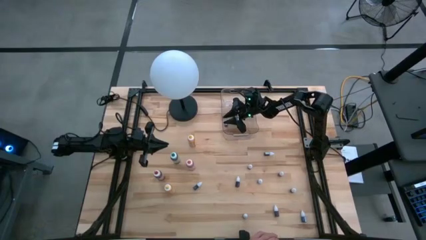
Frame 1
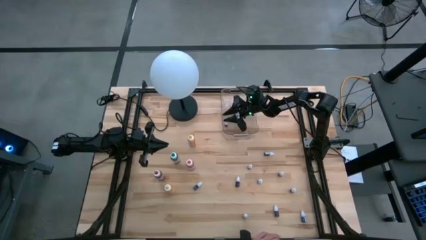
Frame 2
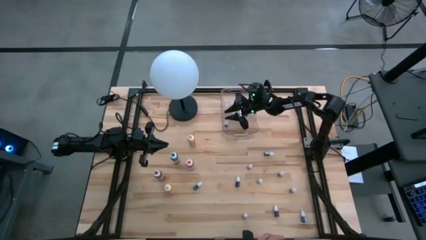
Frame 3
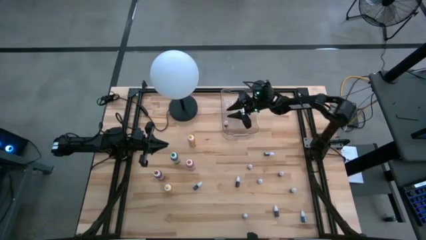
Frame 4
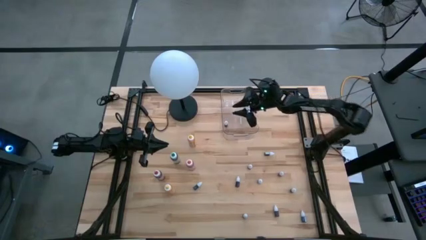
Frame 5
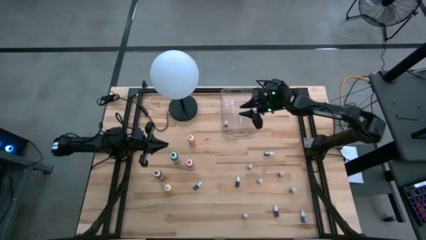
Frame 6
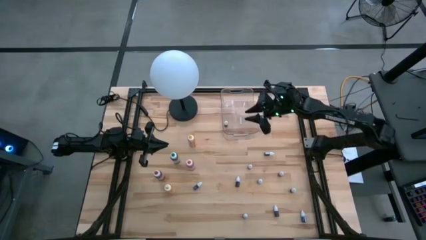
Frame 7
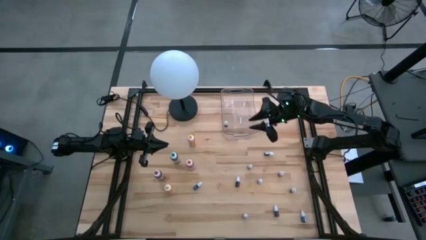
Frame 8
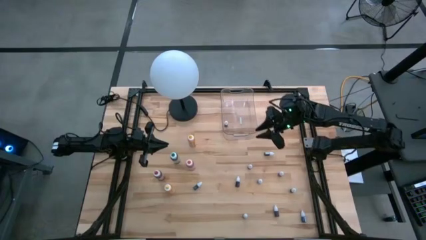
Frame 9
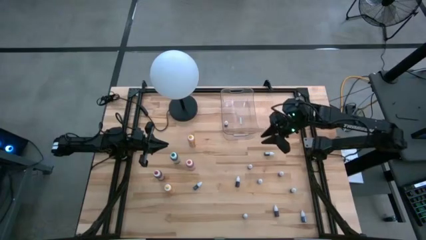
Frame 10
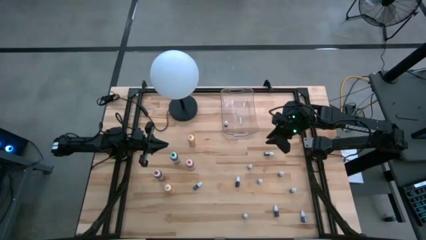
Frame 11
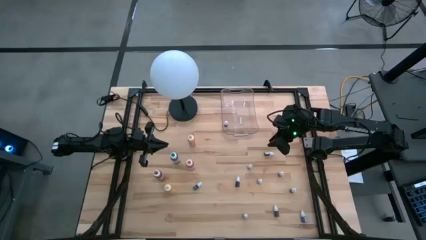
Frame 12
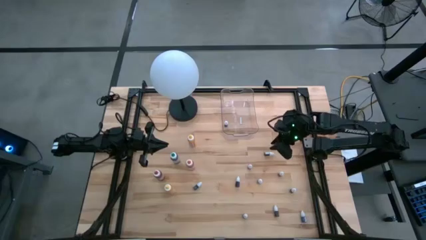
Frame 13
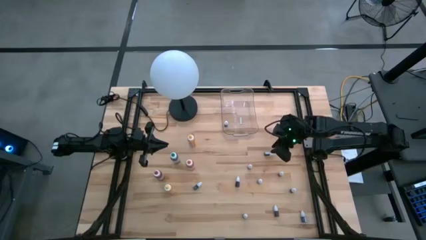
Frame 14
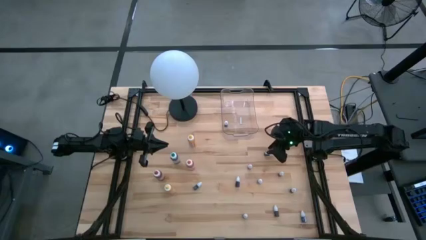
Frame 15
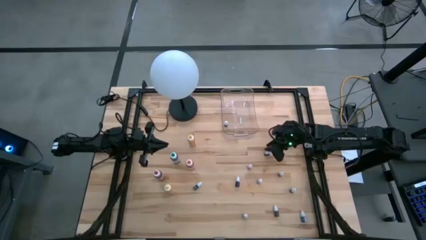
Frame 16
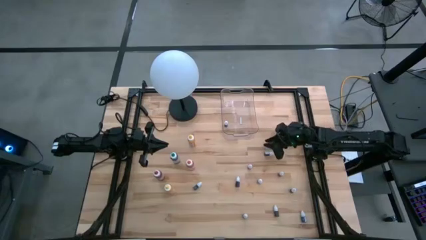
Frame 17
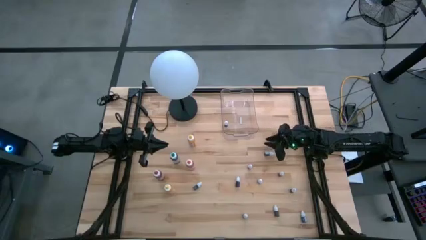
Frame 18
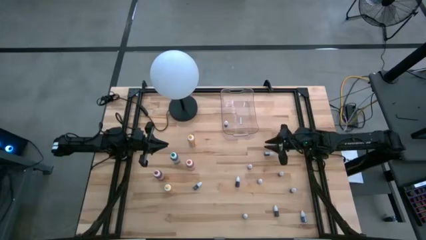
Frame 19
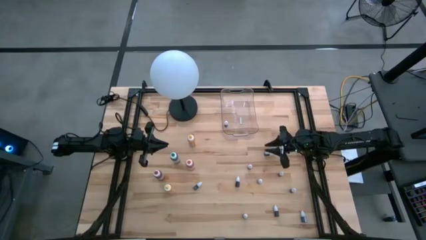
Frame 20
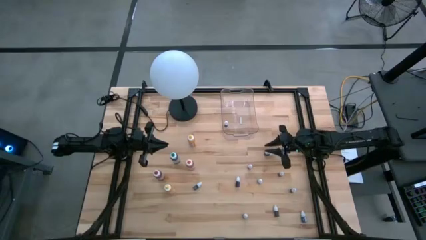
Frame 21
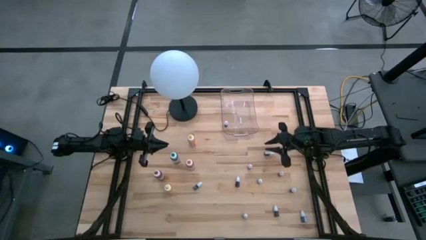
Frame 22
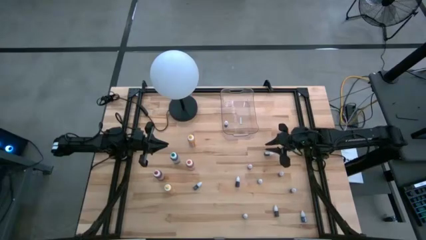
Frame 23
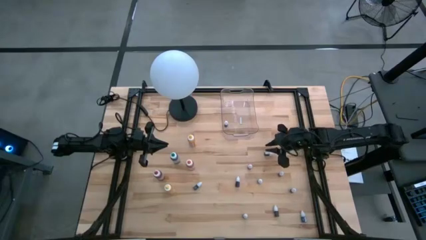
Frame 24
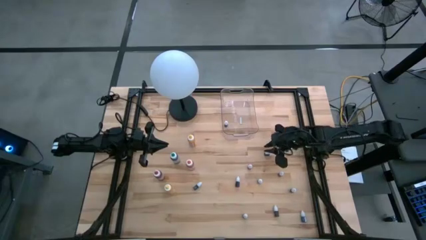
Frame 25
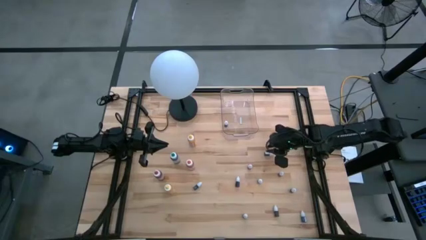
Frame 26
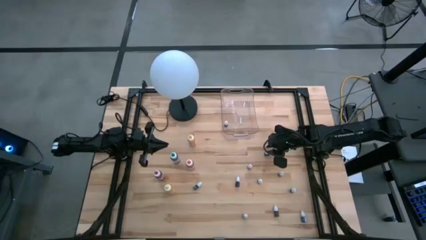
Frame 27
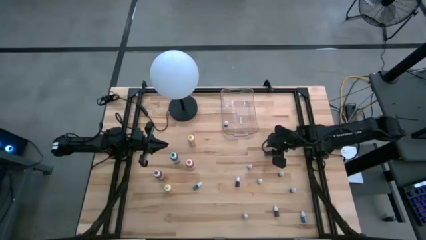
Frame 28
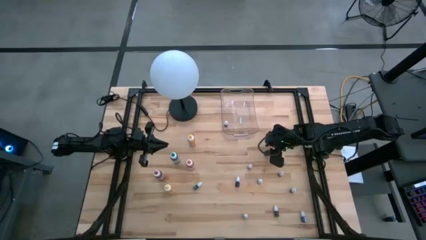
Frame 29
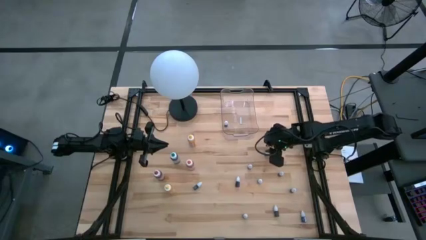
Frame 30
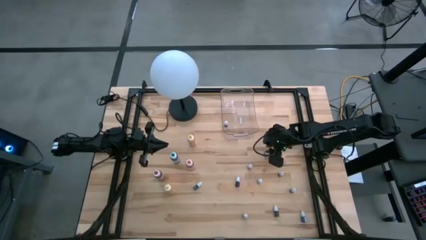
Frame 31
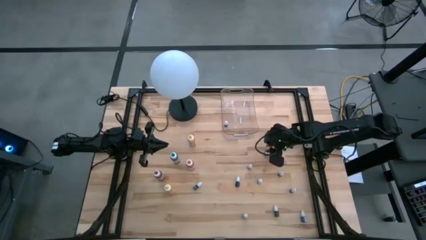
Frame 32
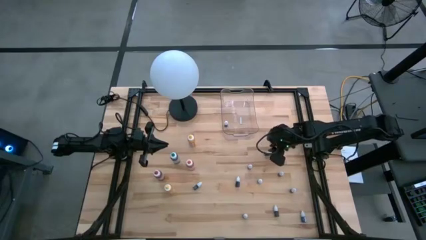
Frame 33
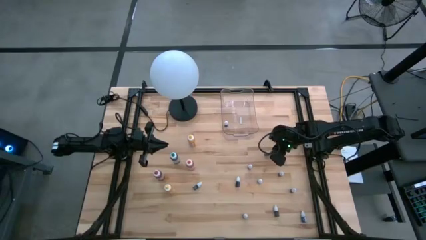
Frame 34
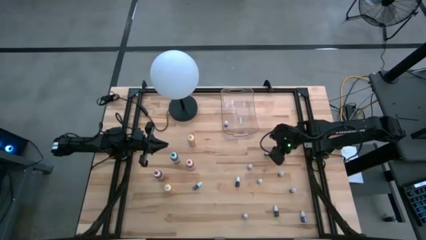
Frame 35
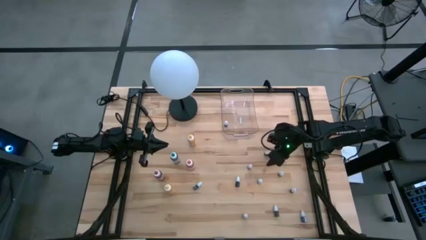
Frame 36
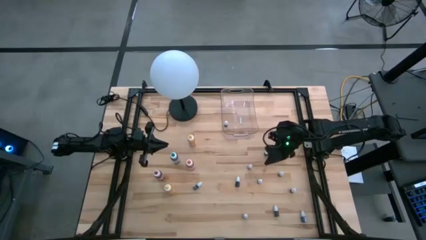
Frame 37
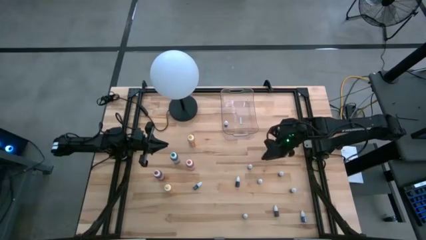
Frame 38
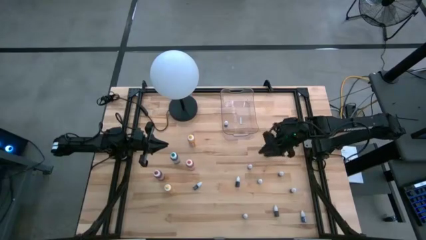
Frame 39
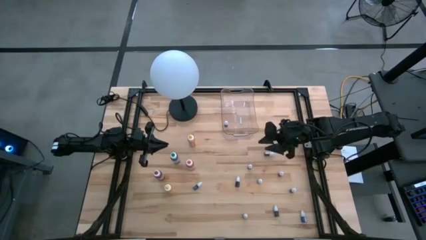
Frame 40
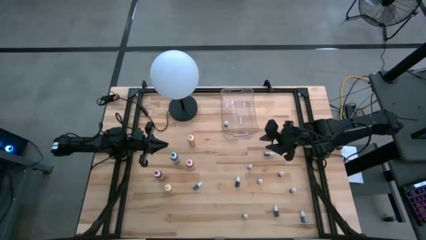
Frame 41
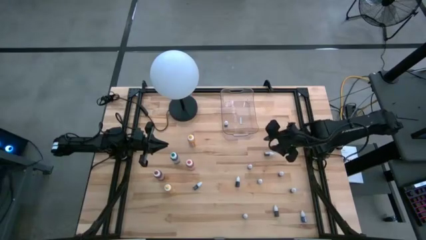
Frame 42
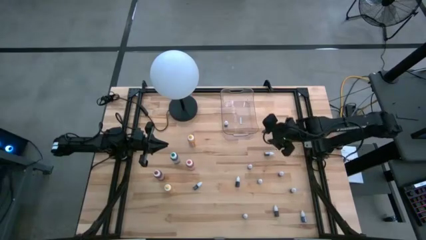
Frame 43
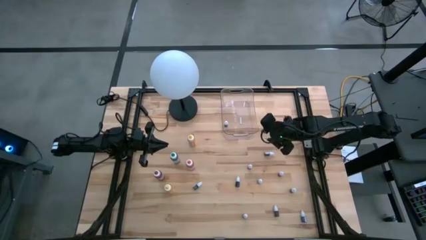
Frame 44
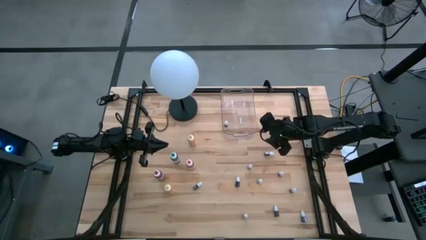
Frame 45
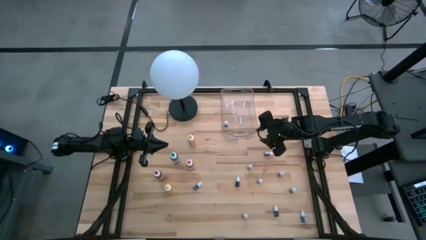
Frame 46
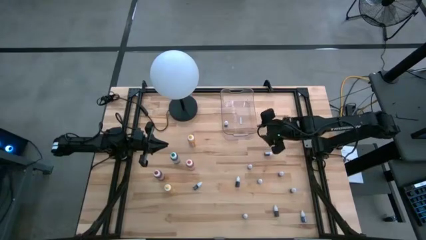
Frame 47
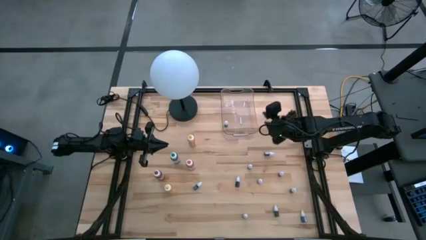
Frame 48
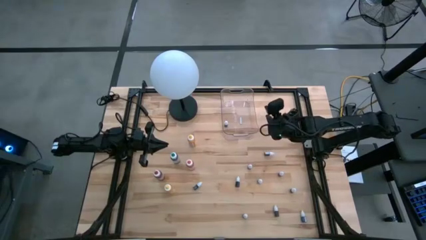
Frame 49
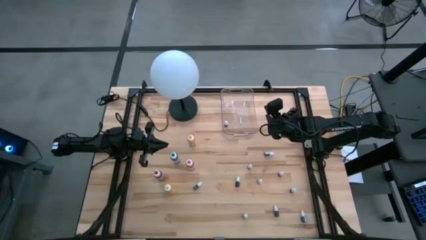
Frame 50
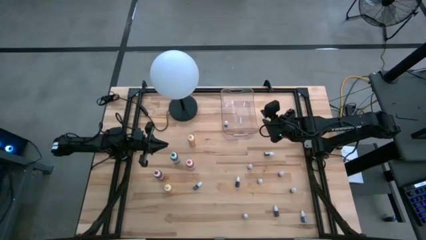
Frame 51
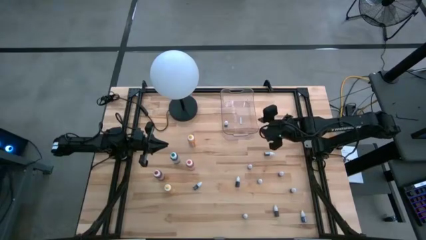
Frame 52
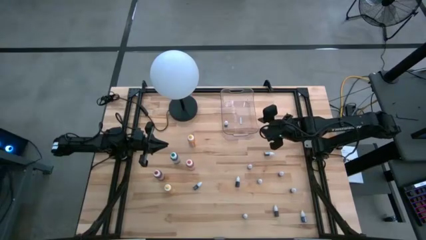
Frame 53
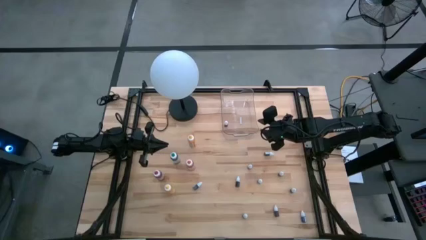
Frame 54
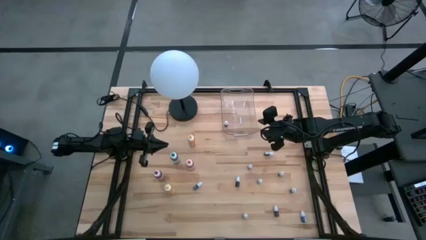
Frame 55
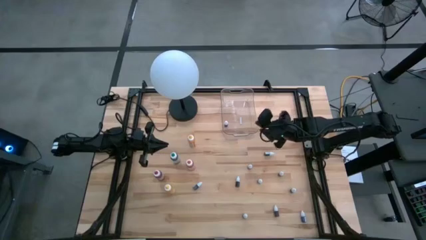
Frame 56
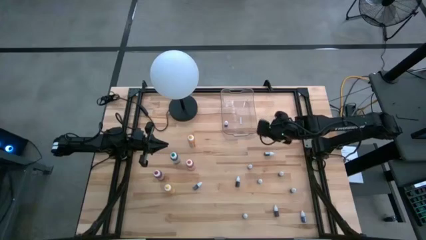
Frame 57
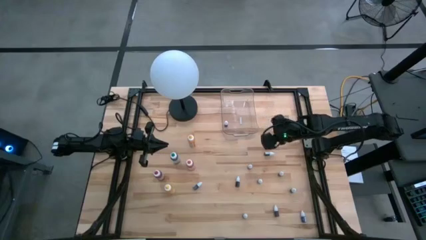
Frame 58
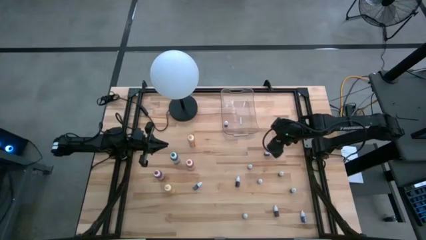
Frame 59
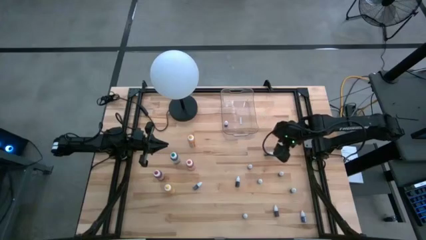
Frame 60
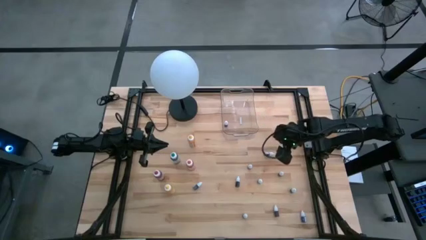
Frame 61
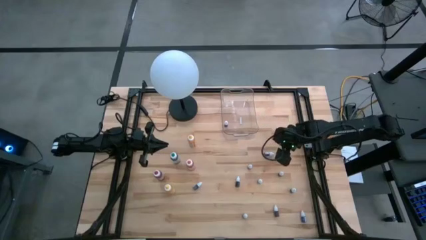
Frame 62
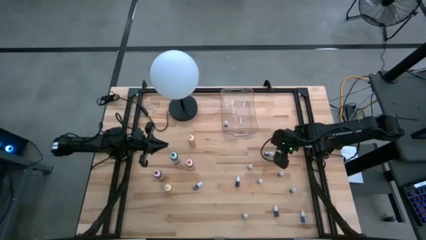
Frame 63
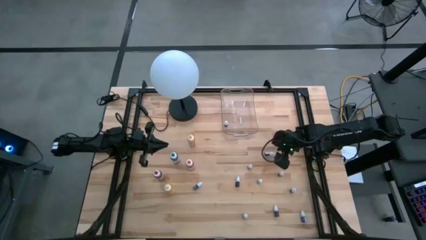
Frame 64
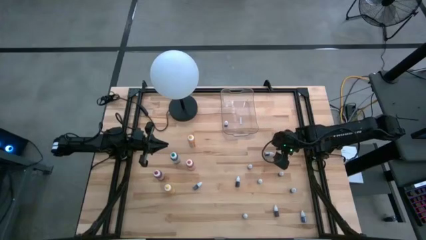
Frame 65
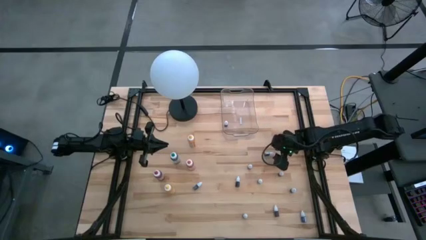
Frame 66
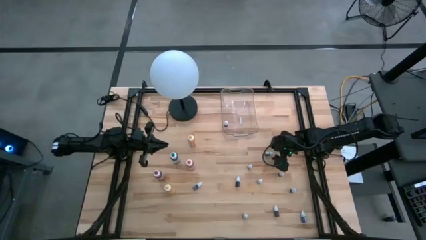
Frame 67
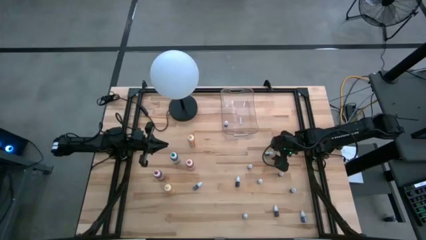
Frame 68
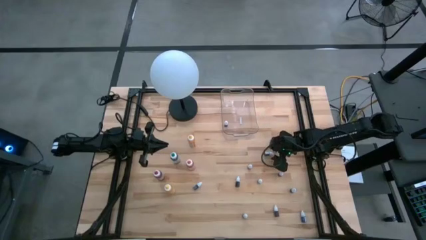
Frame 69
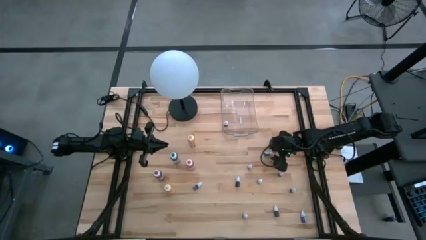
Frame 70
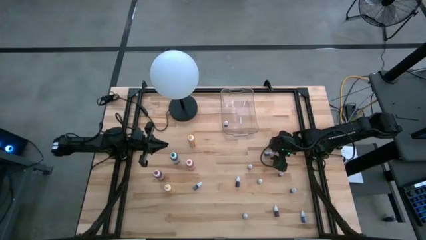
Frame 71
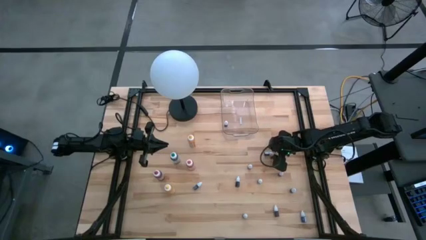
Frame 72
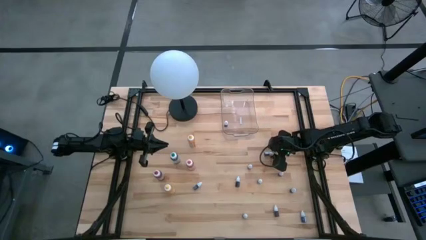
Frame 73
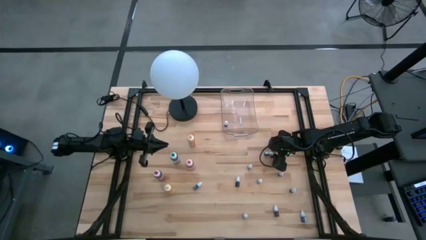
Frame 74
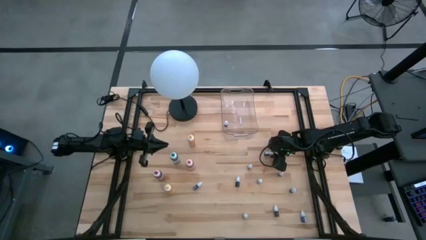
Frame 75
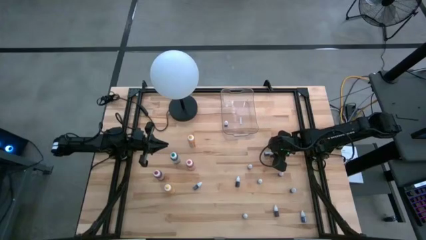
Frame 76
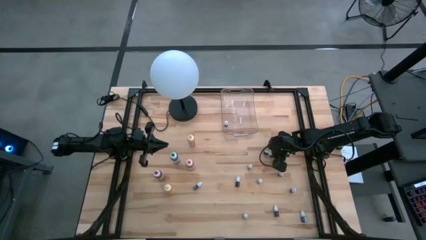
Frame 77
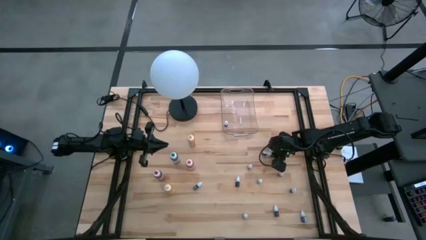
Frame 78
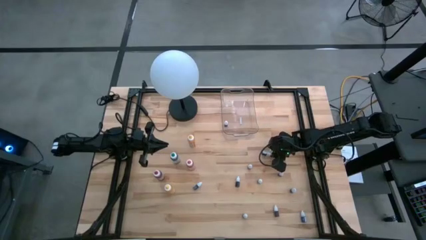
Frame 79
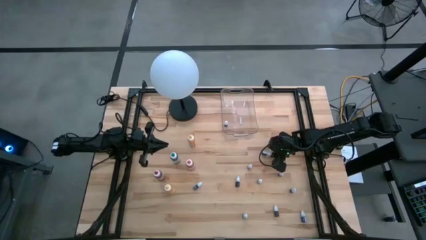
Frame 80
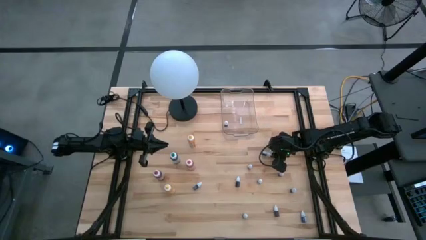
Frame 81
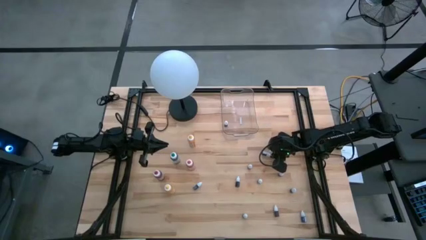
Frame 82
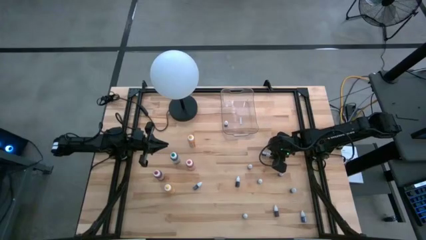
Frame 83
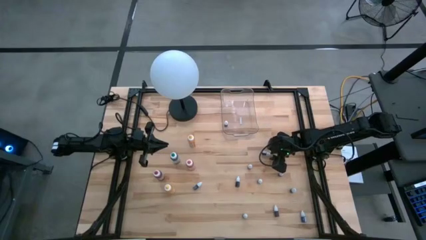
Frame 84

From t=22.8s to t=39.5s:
Task: Pick & Place food coloring
Put the small black food coloring bottle into the transparent bin
